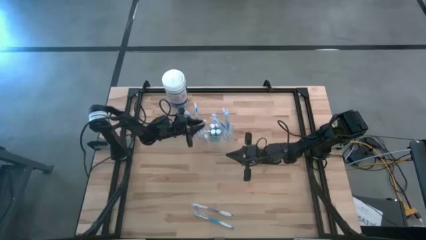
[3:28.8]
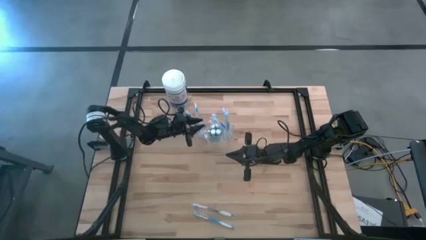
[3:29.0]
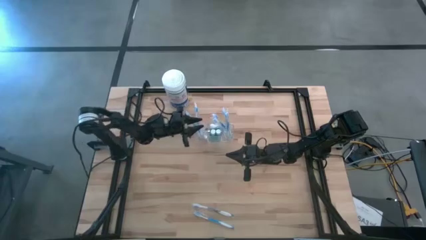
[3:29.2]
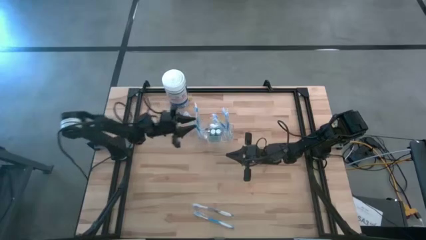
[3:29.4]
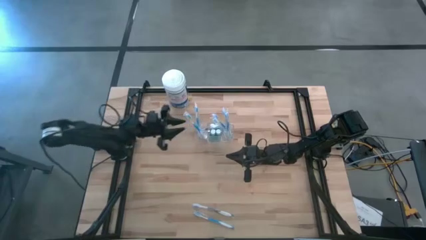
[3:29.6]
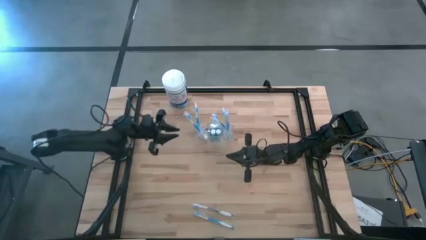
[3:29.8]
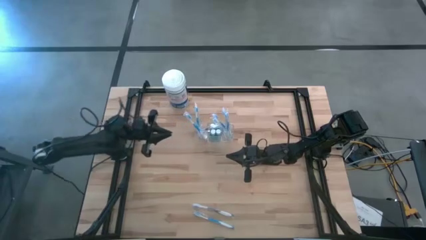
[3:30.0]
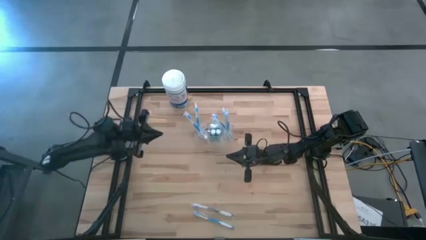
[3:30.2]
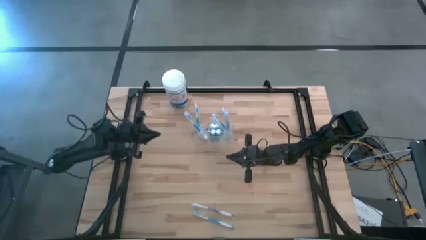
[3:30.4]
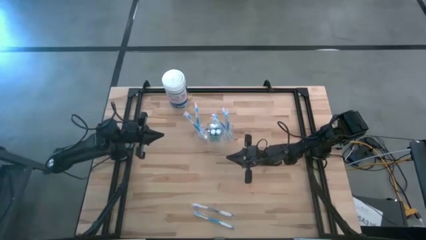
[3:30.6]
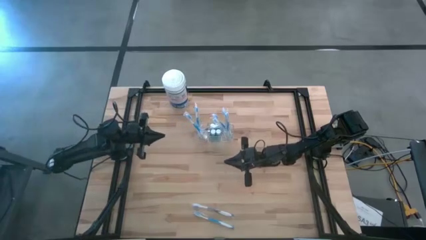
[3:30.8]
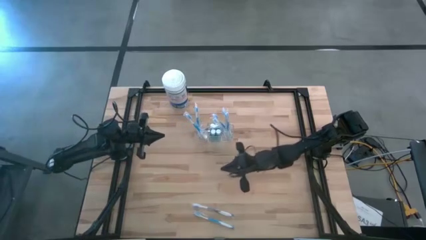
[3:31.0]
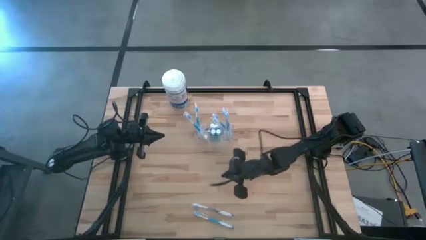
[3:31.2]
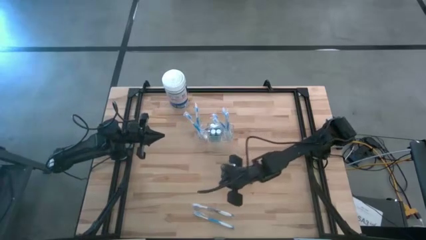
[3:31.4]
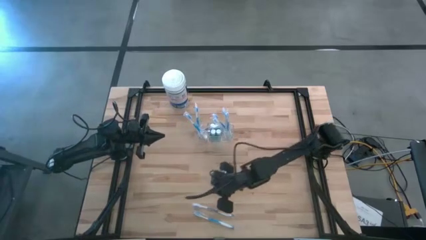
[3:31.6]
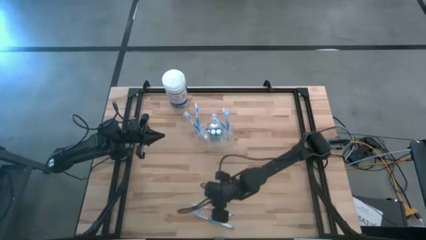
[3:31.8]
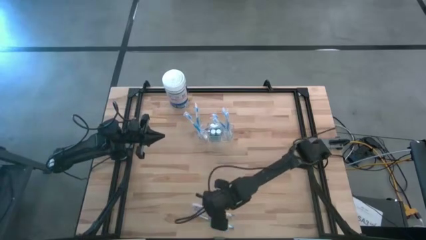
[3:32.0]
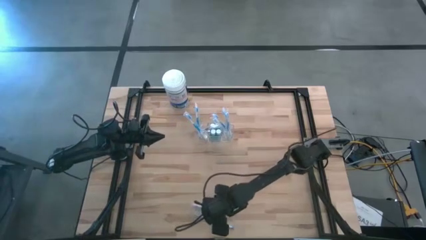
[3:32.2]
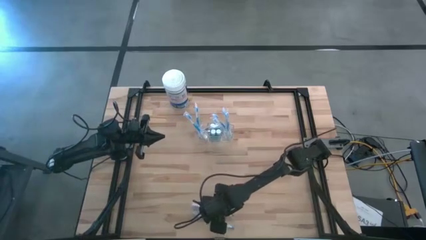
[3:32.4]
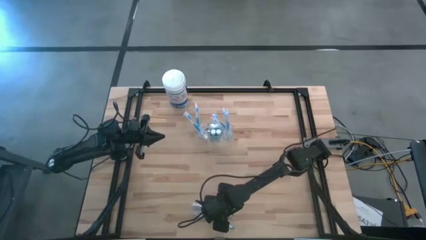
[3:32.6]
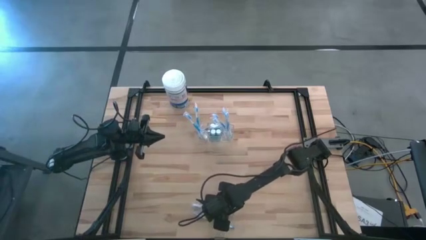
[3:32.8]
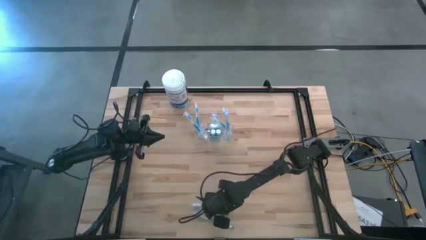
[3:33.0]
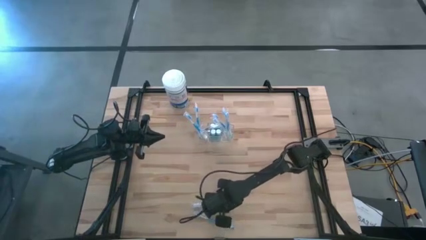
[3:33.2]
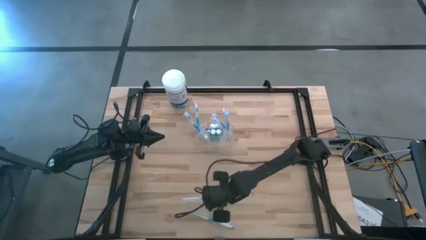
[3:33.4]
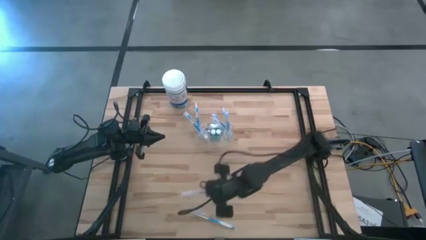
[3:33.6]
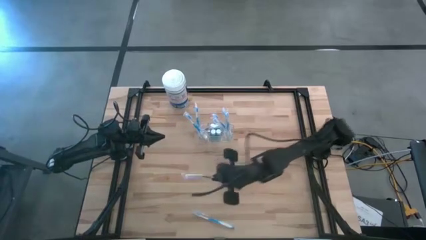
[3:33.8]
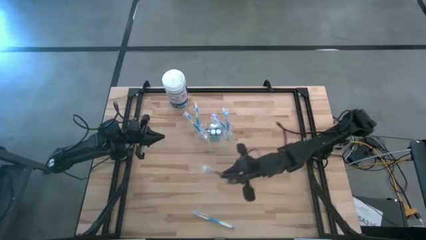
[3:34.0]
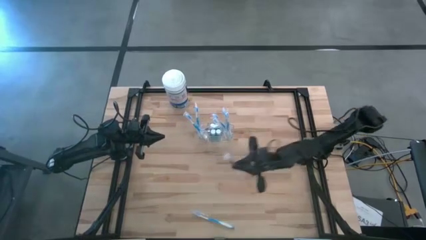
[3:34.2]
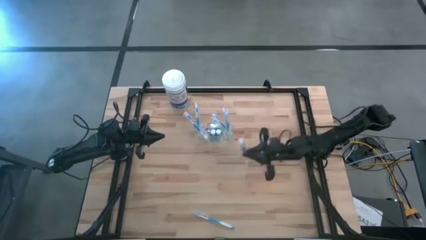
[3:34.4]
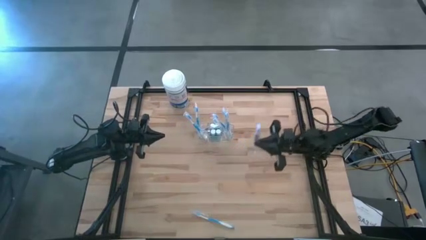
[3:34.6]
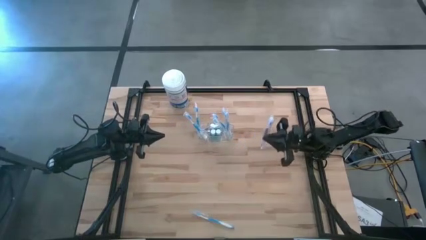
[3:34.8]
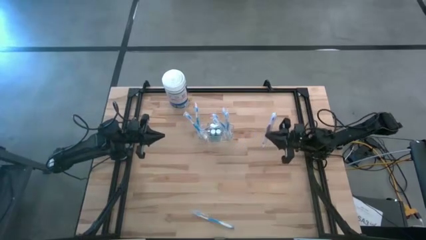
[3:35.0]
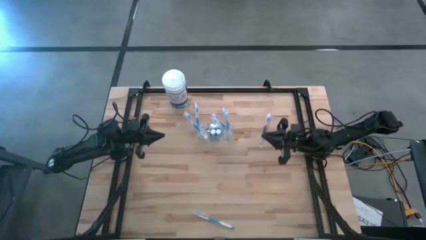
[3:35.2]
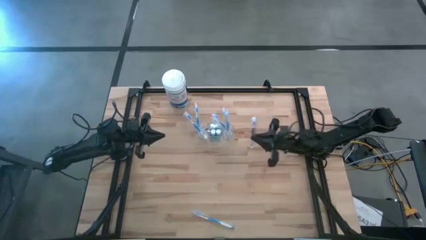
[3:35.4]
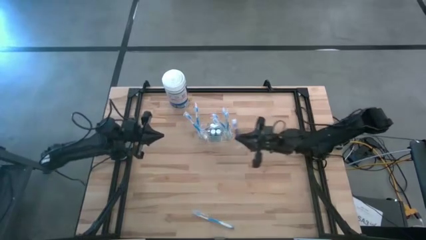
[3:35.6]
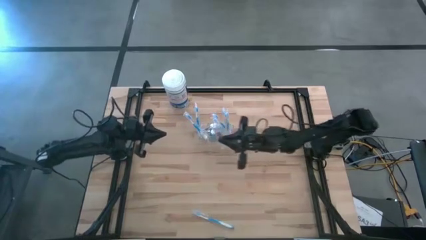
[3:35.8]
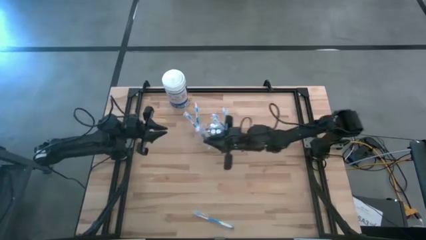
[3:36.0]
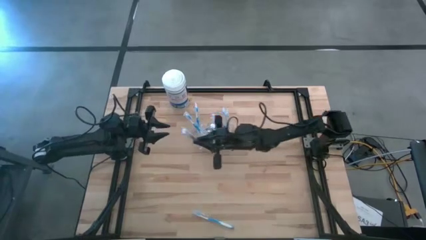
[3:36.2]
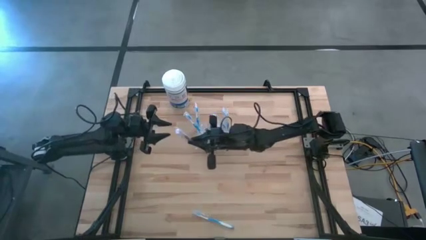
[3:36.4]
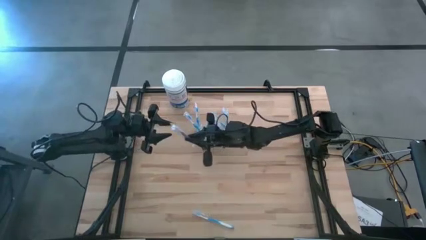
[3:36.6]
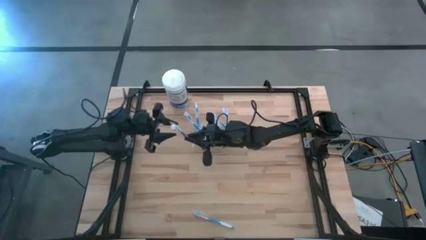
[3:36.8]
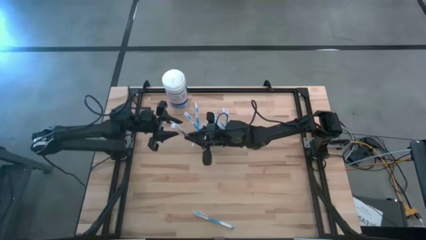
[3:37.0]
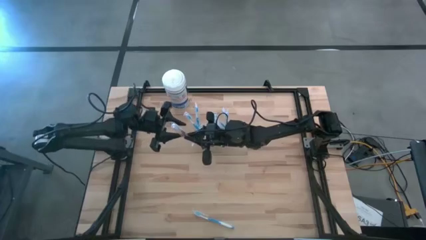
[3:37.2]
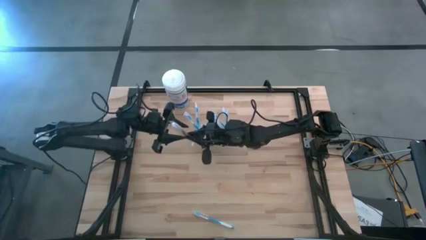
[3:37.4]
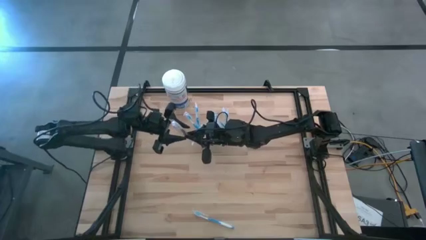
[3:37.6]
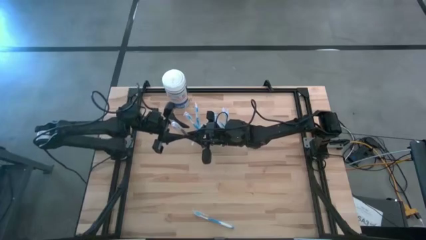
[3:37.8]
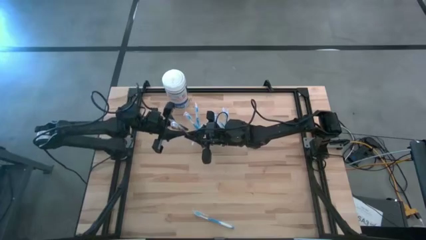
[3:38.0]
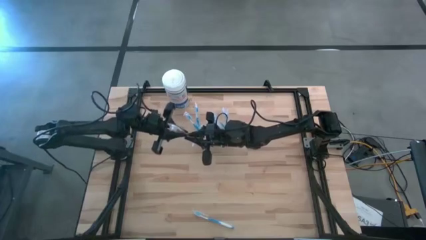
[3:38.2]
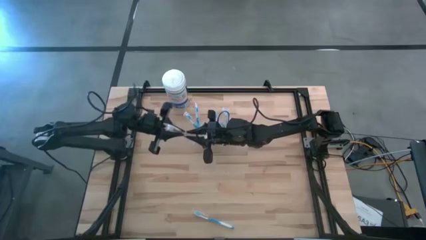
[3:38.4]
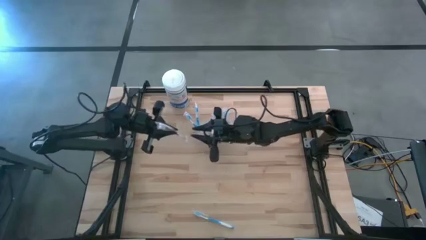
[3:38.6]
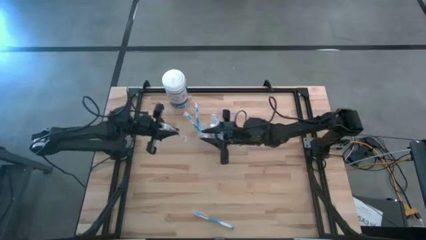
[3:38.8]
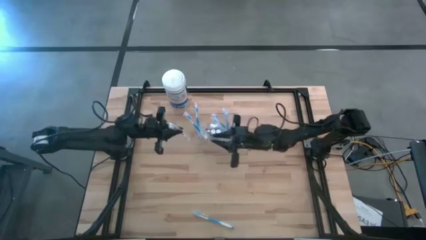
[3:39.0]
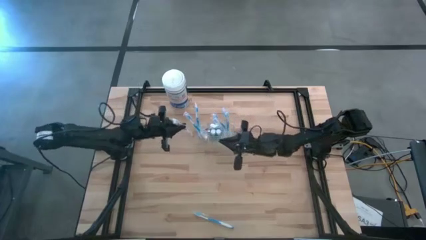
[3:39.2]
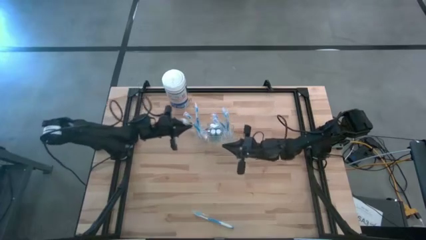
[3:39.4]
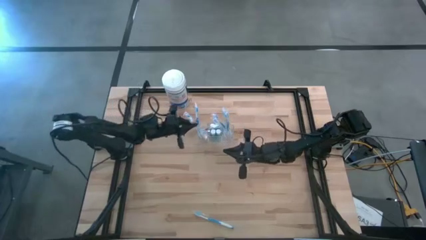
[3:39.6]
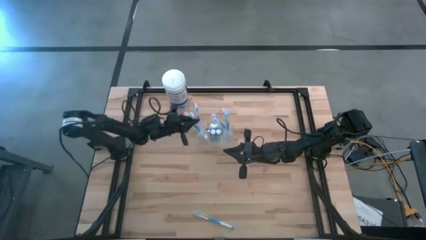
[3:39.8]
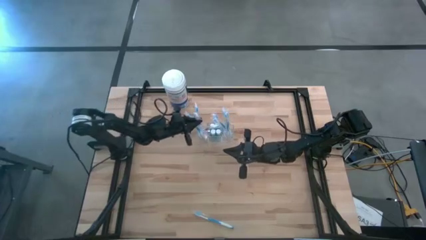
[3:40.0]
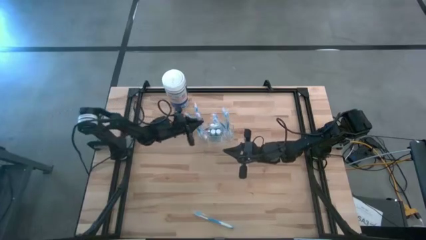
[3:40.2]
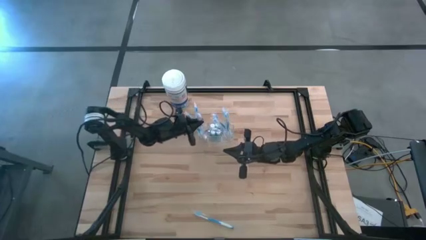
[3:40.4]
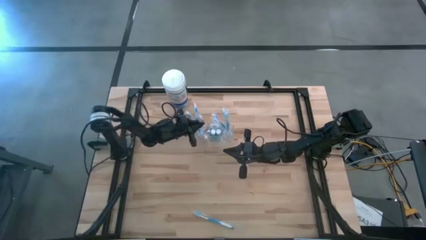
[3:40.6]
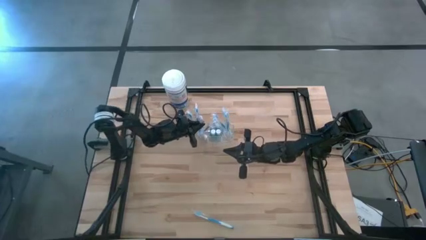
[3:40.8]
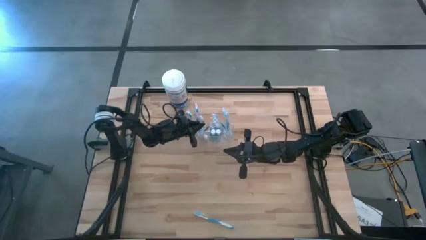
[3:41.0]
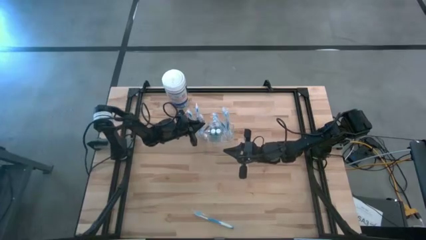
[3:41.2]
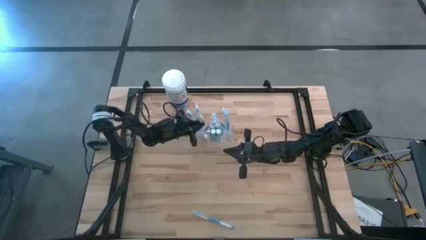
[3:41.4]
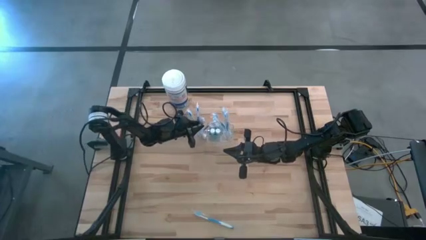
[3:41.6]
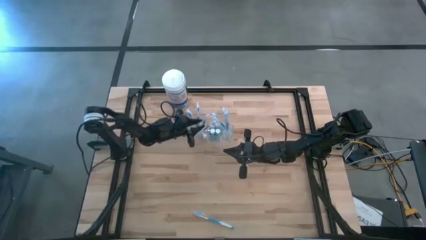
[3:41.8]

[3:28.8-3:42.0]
Task: Pick & Place toothbrushing station
Put the violet toothbrush in the transparent organizer

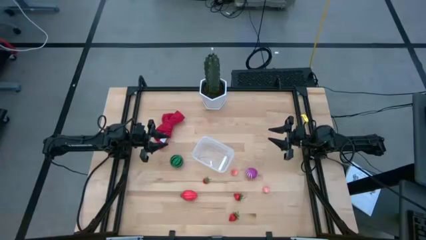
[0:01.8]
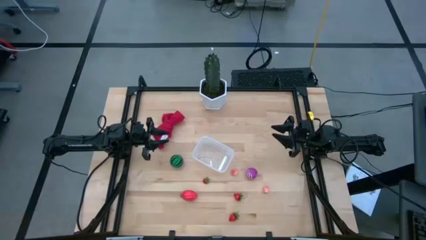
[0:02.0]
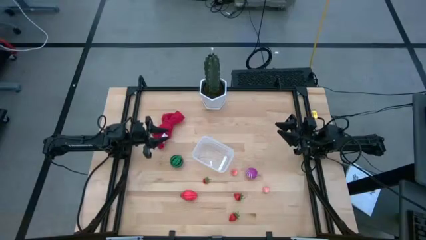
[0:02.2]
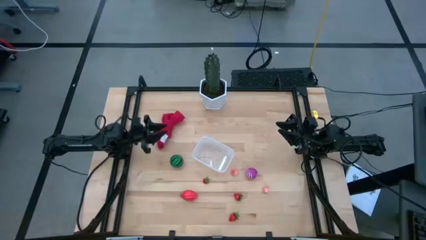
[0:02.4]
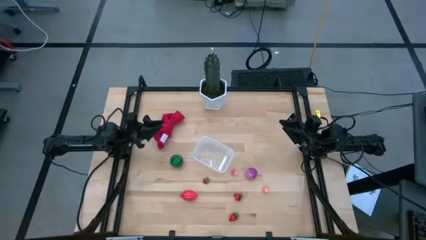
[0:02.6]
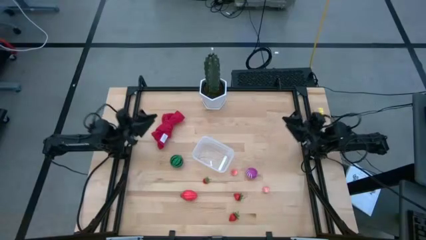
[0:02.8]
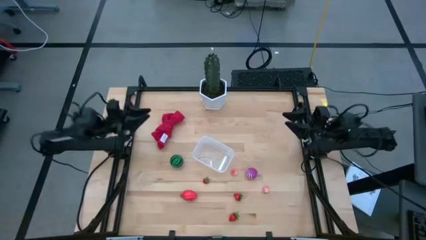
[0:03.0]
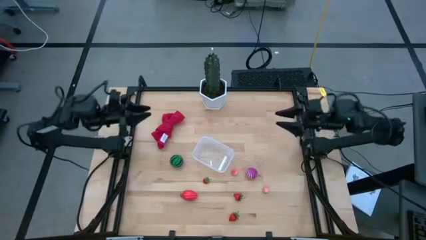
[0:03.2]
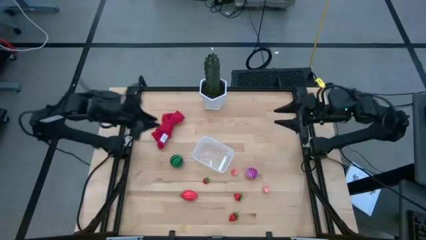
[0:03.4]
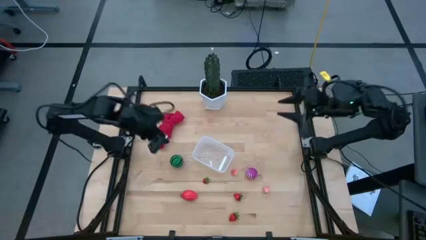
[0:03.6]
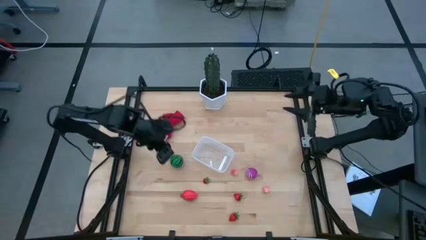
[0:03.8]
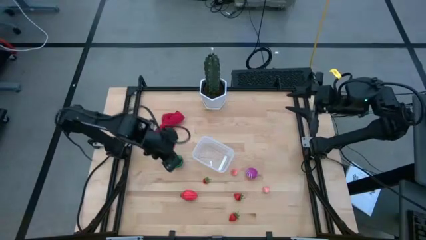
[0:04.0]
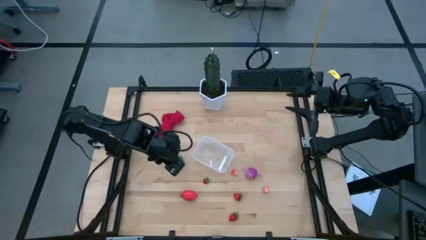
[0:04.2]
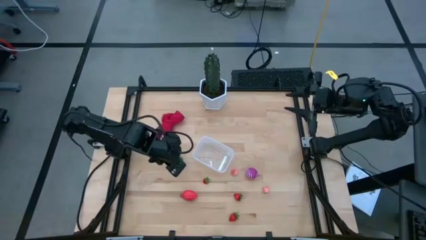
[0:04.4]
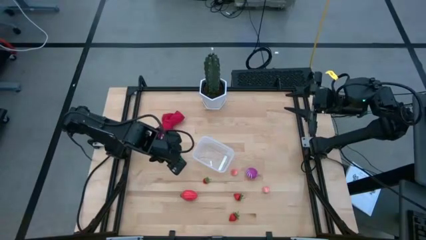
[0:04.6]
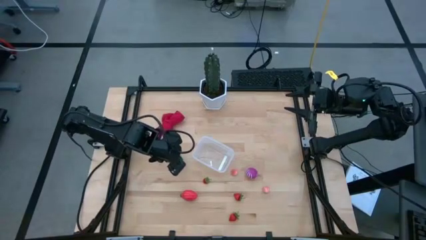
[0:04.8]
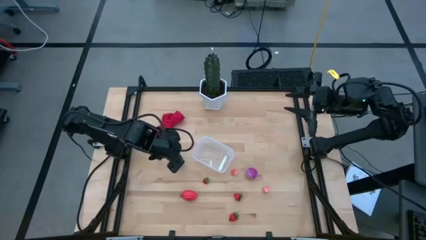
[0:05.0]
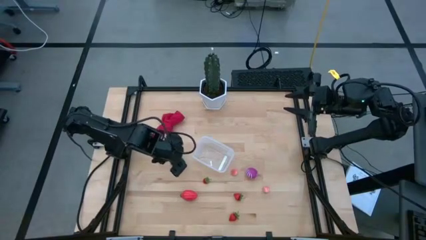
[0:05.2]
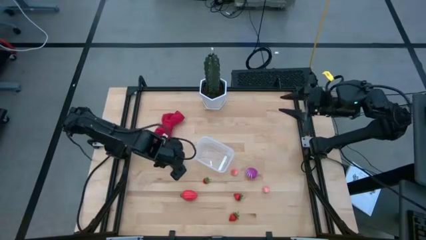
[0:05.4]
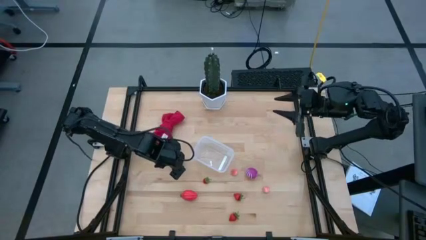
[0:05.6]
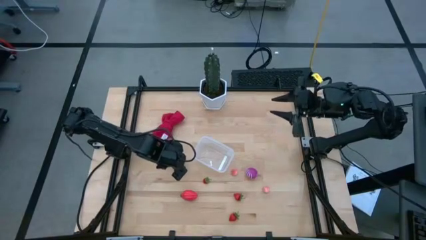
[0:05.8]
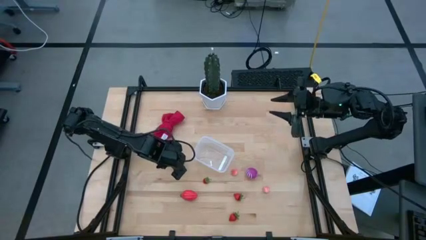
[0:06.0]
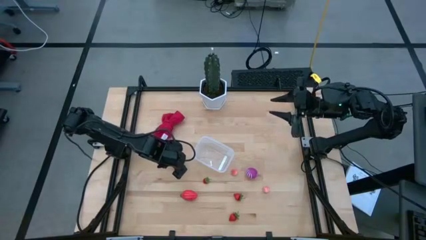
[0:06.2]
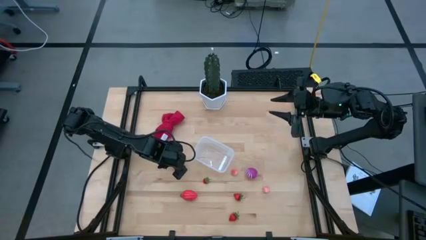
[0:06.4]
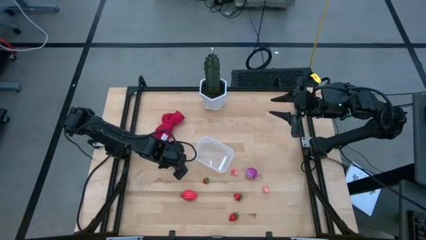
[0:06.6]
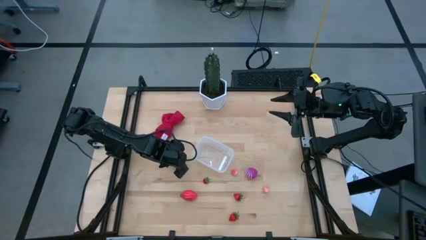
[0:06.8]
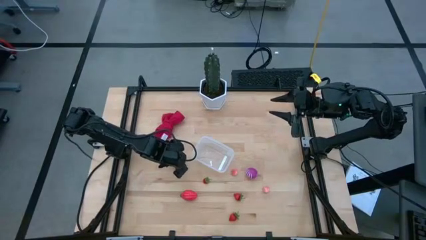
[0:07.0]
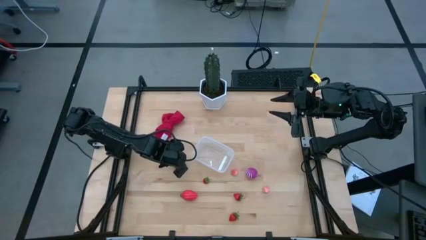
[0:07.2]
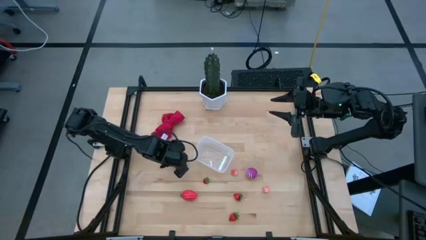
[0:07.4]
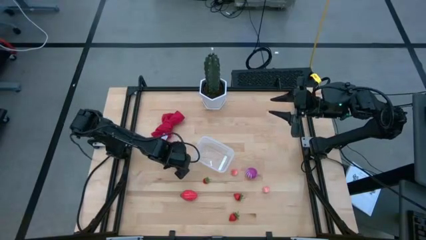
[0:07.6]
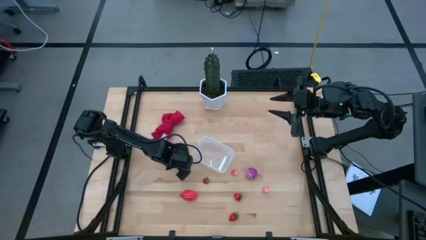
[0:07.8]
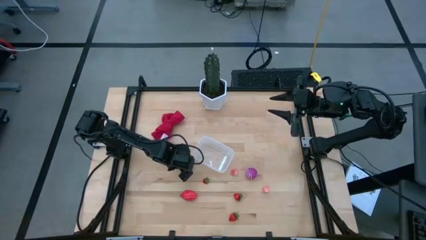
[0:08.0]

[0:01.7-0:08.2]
Task: Pick and placing Produce into tupperware
Put the green watermelon into the transparent container
